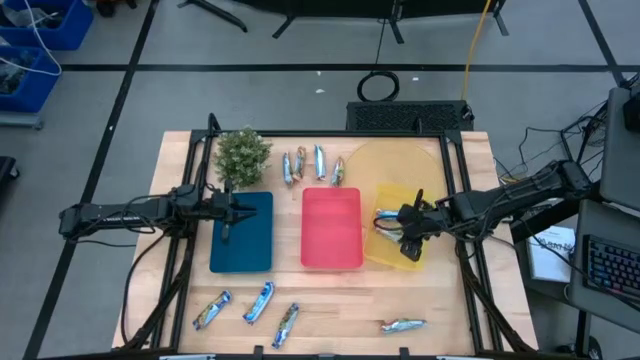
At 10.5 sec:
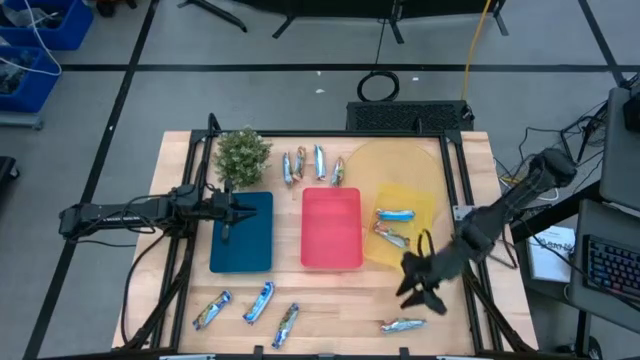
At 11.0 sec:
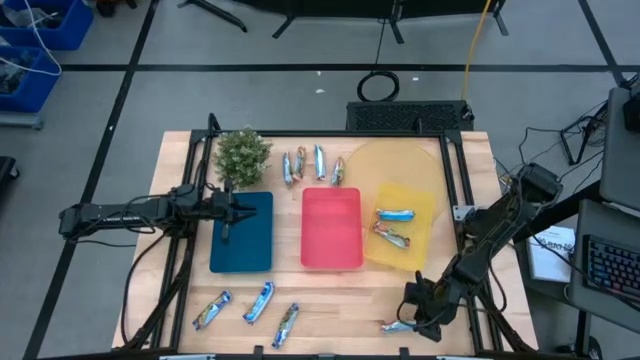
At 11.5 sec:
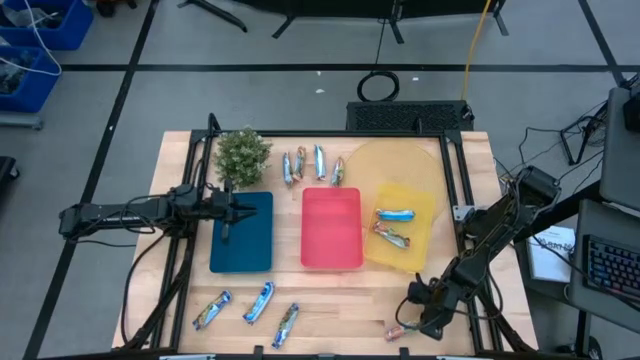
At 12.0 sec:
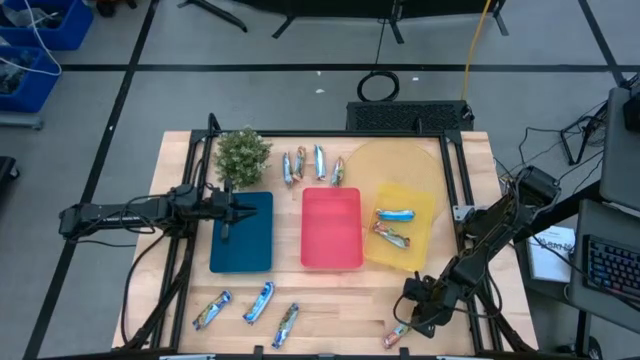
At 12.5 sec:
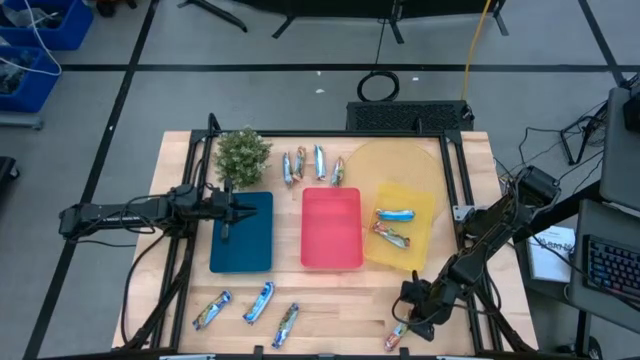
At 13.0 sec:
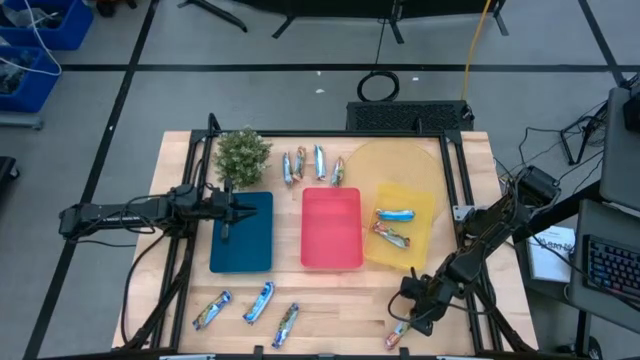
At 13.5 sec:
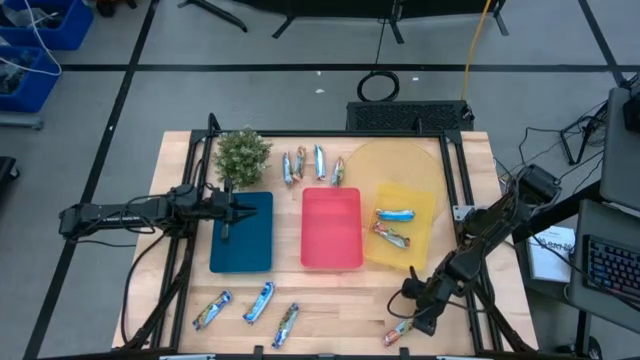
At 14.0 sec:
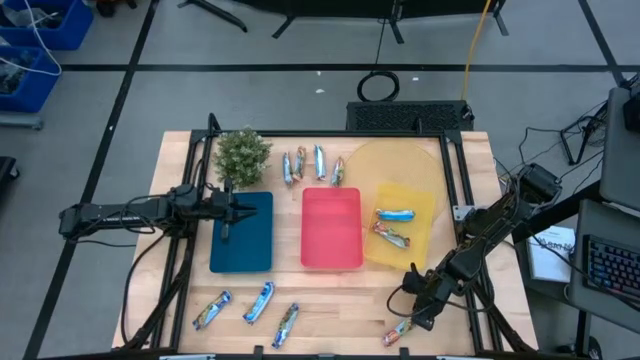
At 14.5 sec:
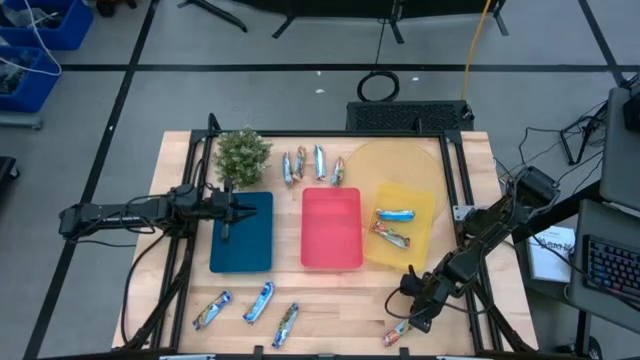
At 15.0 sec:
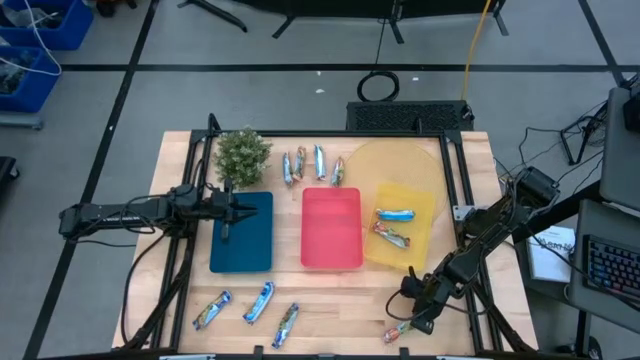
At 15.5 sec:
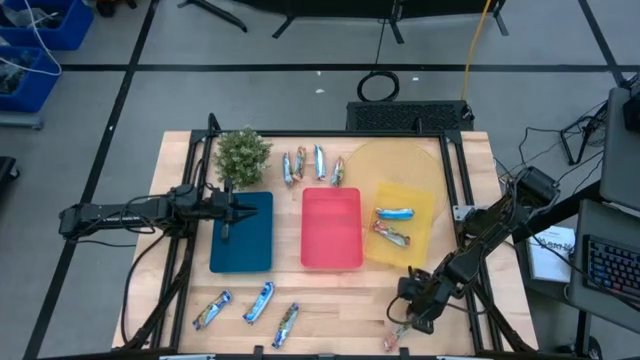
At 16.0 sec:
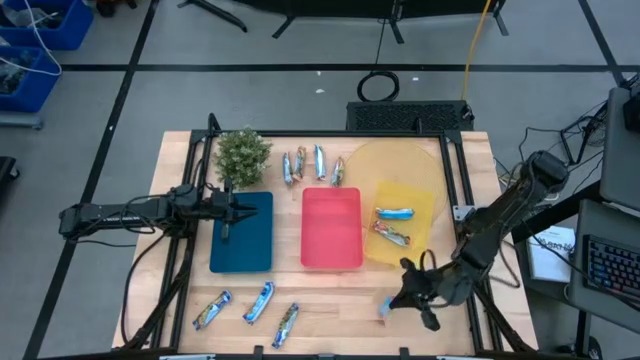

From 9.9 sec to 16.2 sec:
Task: Pick and place Granola Bars by type
Put the red granola bar into the yellow bin

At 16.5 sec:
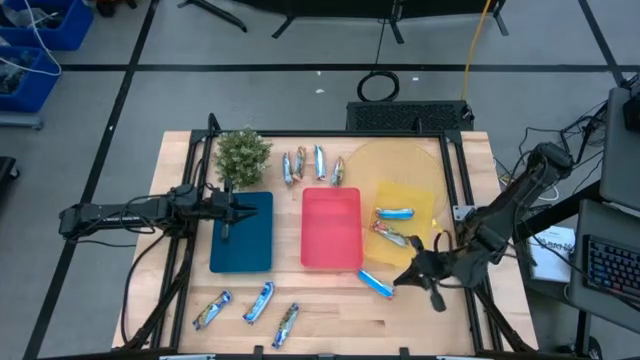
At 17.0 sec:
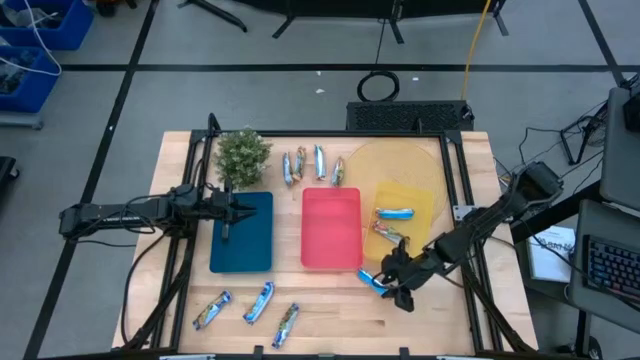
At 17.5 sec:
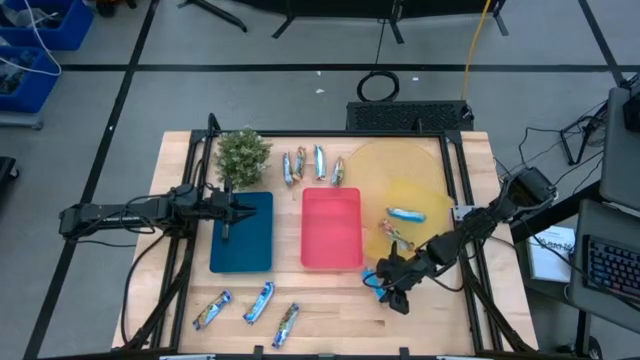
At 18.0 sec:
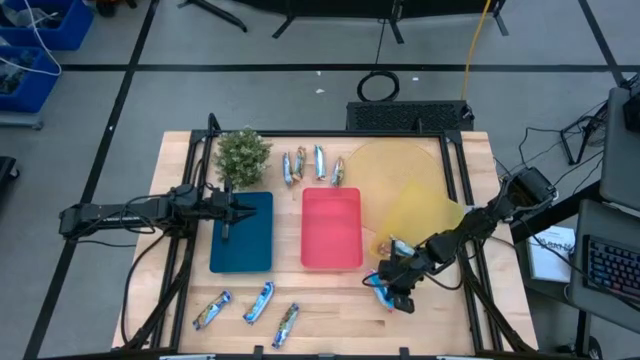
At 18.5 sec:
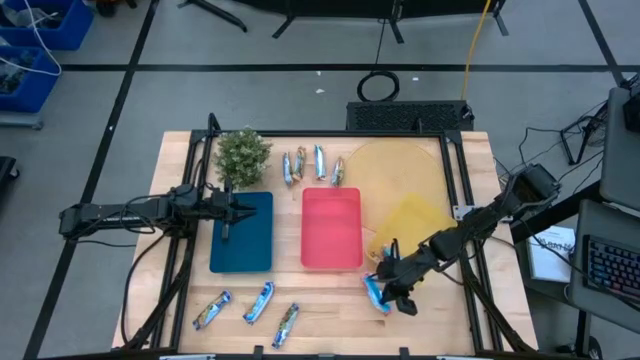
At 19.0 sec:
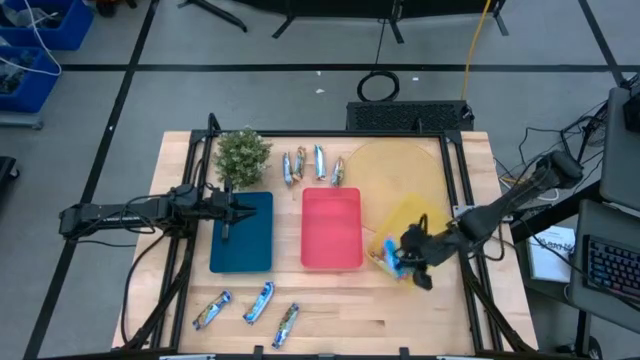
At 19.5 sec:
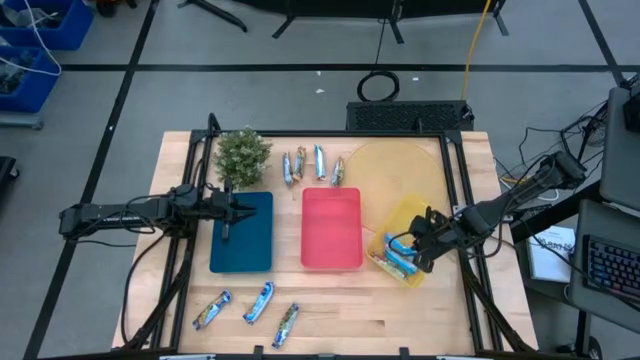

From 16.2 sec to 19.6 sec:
Put the red granola bar into the yellow bin

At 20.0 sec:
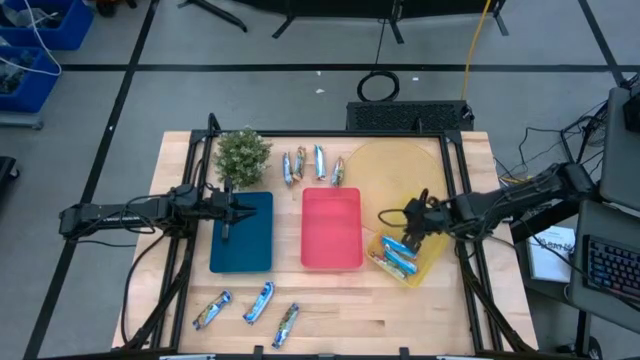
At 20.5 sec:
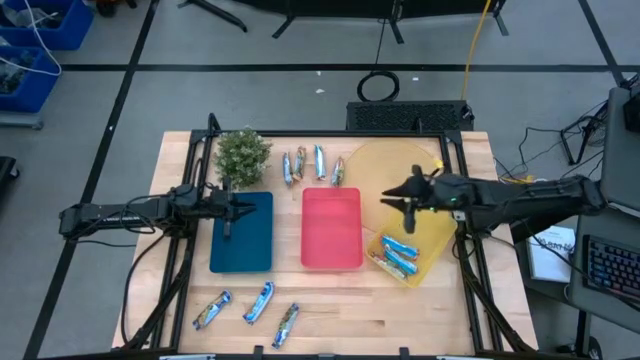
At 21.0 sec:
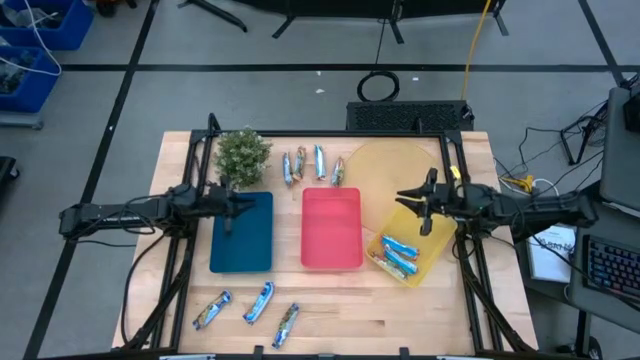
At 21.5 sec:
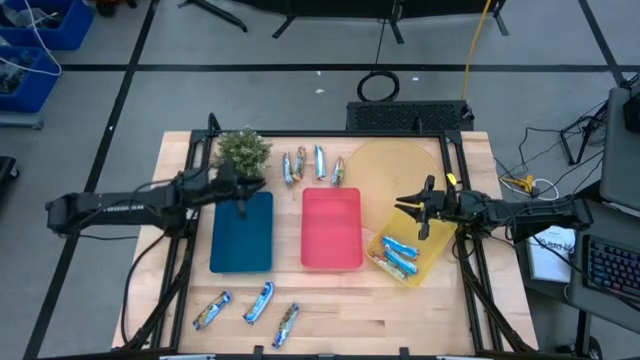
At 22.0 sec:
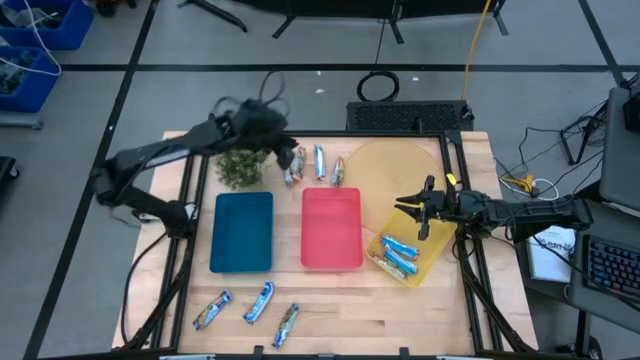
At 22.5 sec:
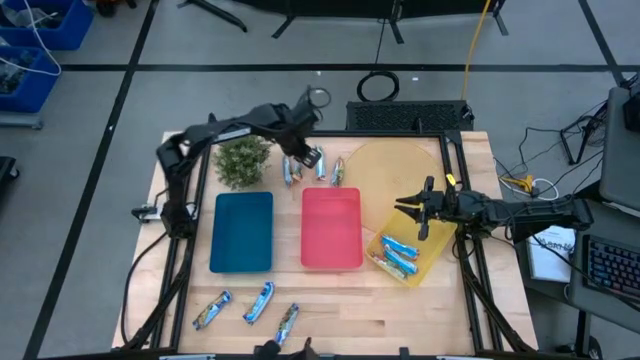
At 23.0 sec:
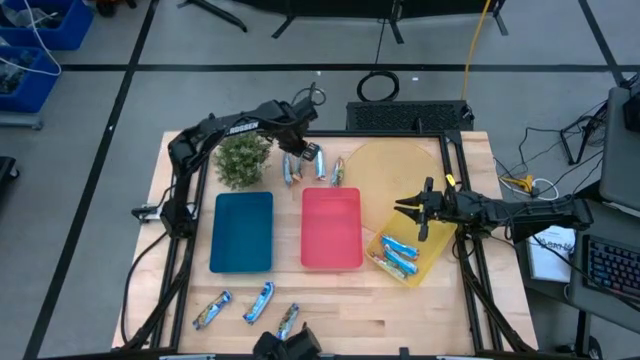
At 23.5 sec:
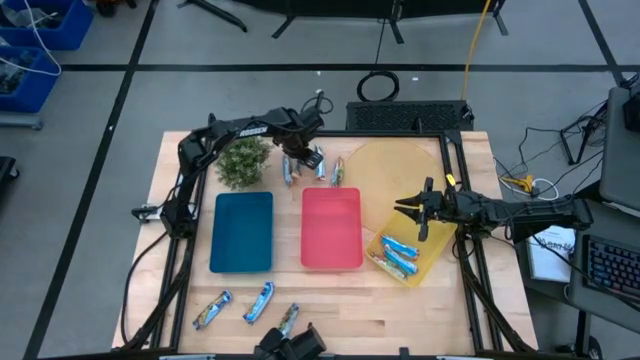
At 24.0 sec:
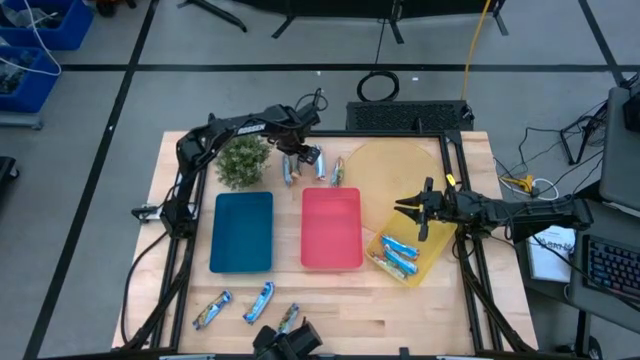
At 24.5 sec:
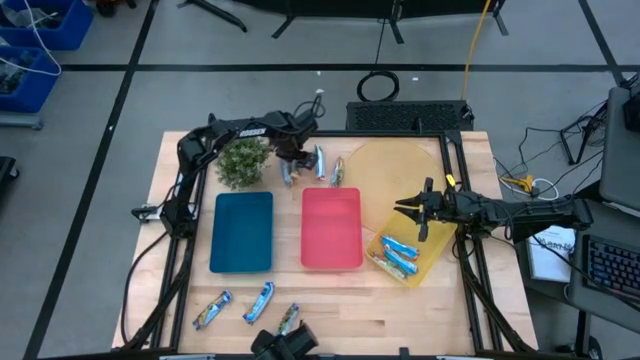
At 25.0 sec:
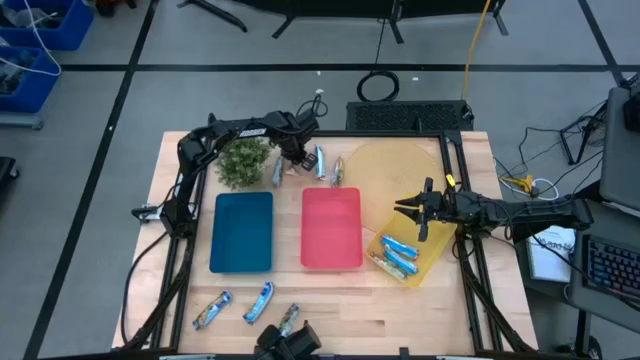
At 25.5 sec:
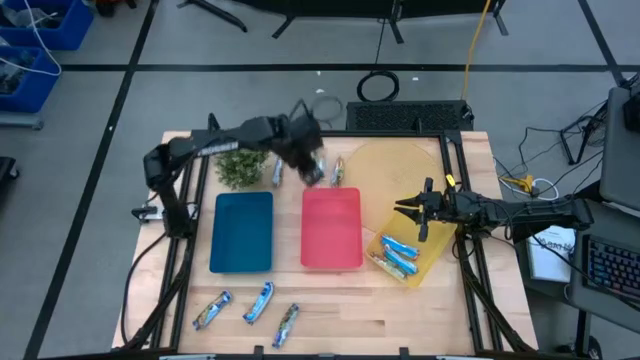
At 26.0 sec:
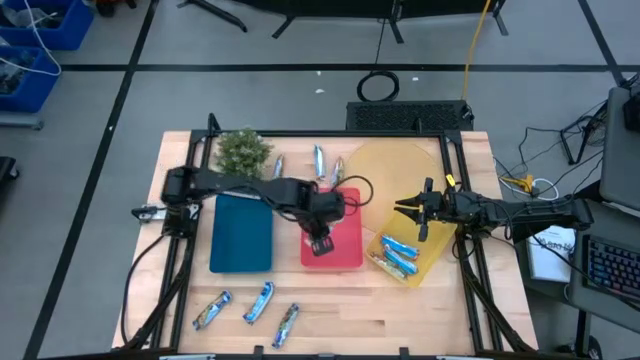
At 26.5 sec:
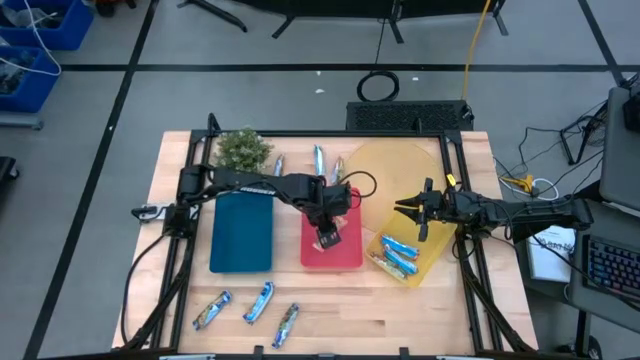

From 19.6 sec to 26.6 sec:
Put the yellow granola bar into the red bin

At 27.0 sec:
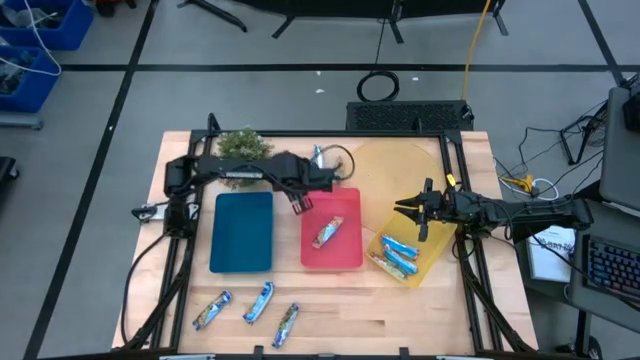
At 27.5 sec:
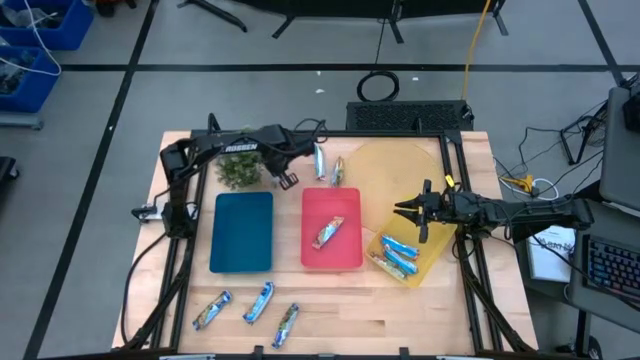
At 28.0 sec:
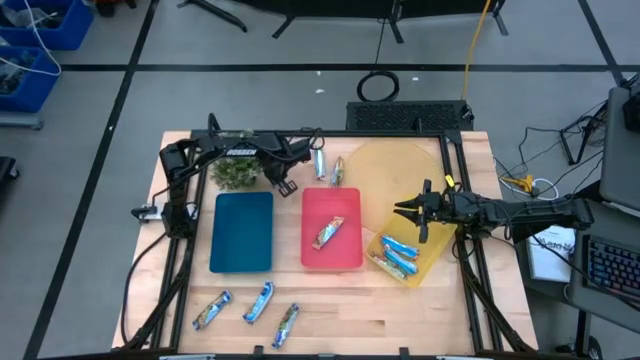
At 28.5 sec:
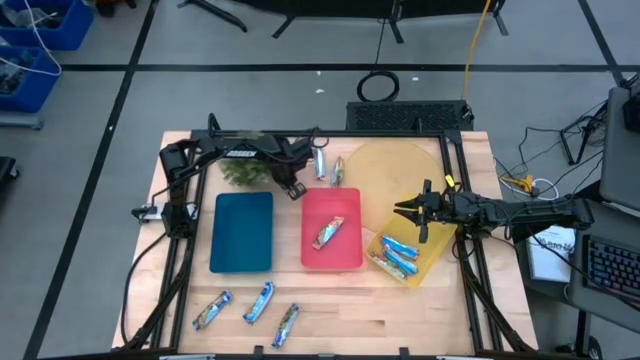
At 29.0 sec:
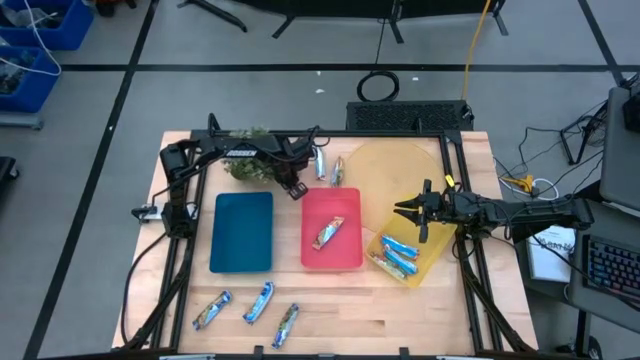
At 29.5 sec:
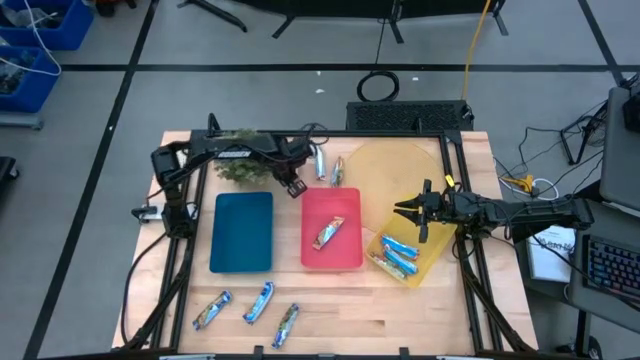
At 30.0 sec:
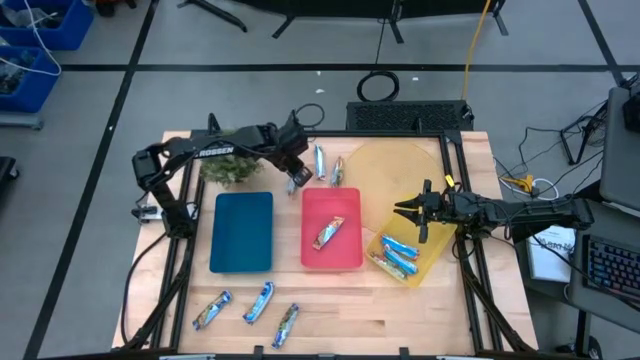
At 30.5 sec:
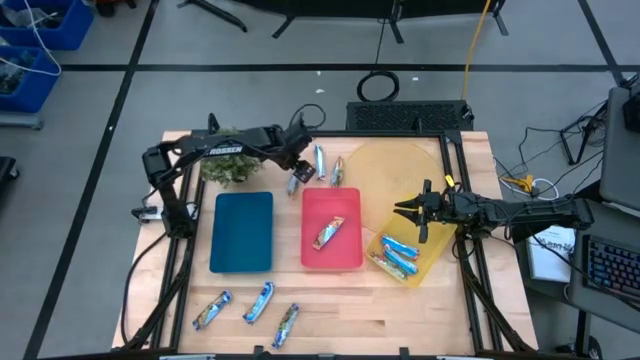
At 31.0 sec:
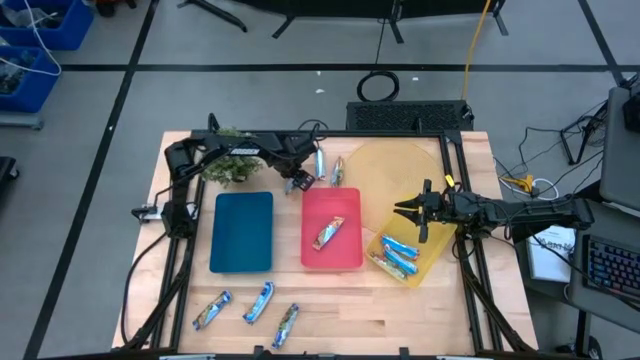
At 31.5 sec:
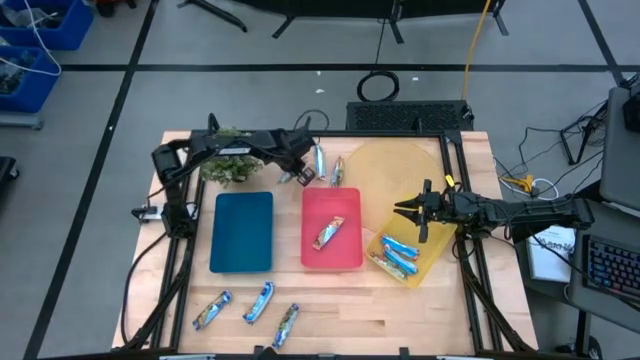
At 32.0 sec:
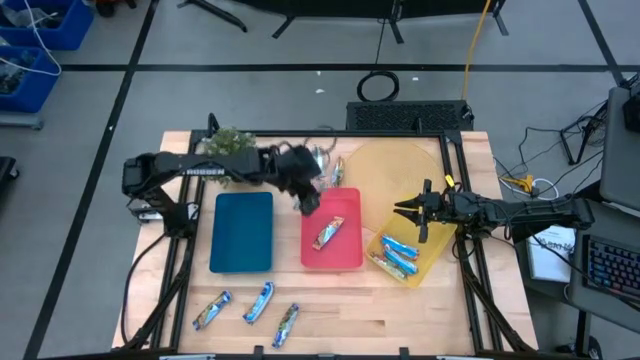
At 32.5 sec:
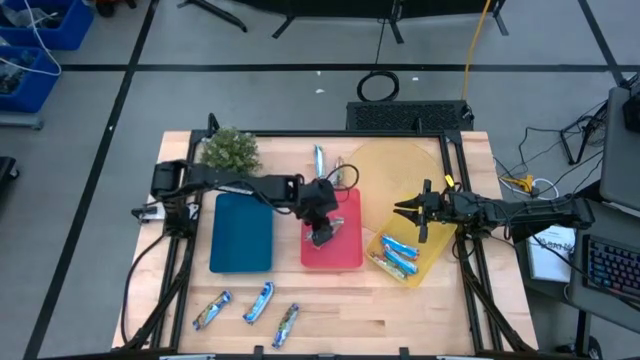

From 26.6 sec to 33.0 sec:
Put the yellow granola bar into the red bin
